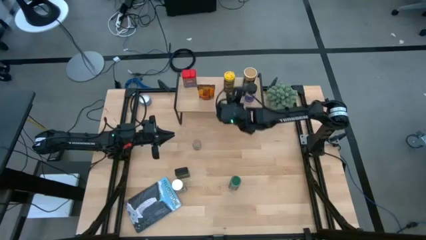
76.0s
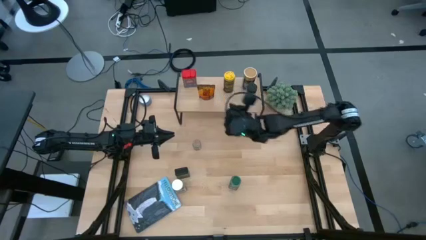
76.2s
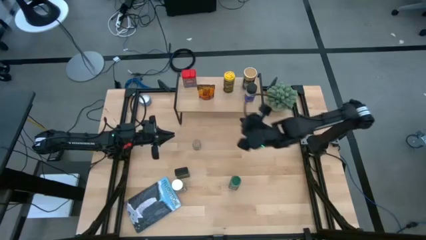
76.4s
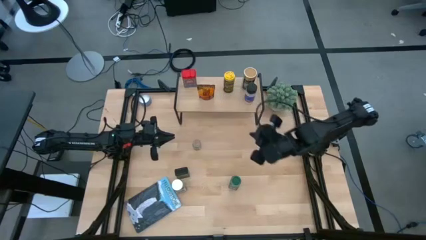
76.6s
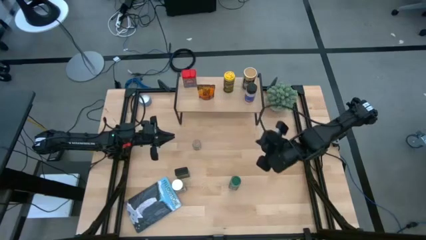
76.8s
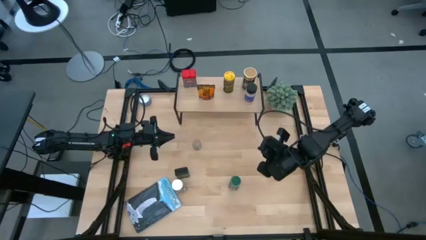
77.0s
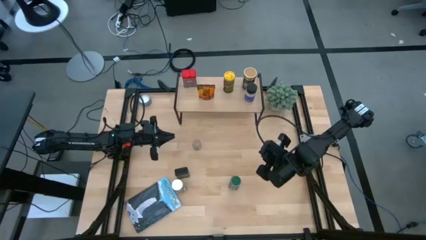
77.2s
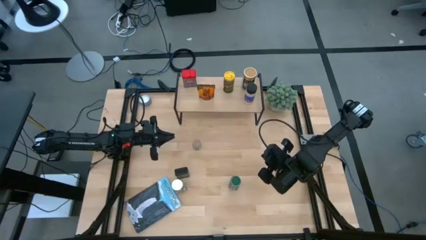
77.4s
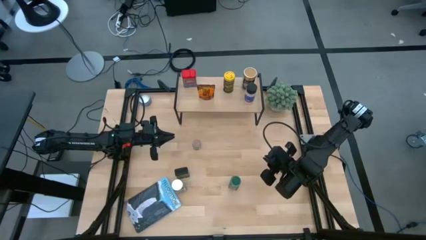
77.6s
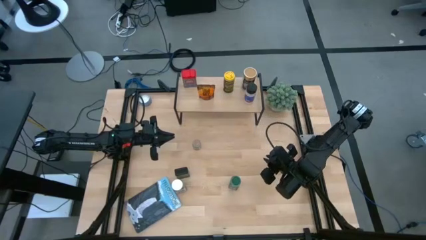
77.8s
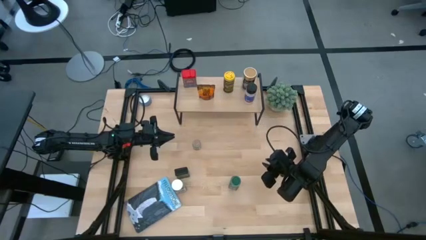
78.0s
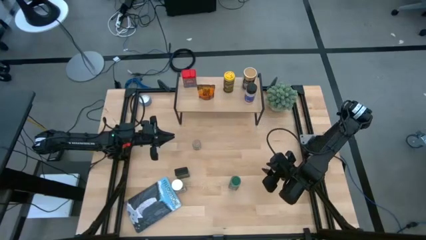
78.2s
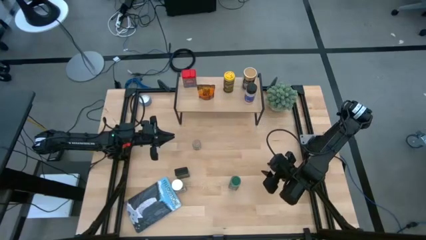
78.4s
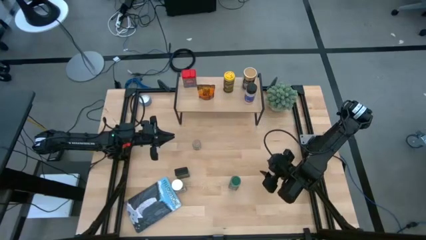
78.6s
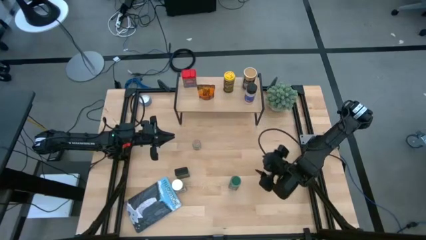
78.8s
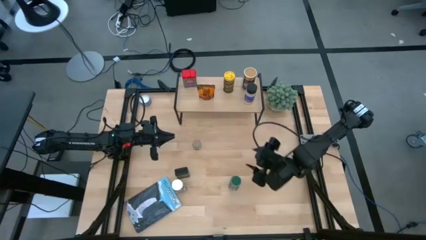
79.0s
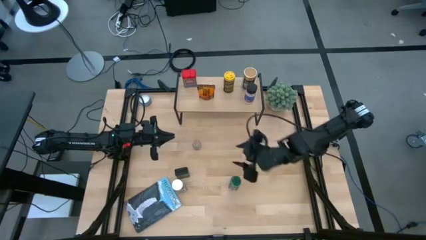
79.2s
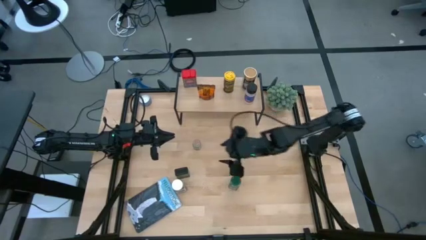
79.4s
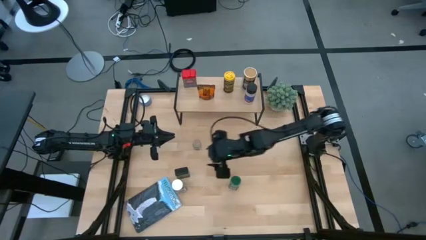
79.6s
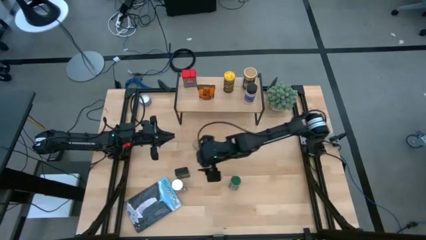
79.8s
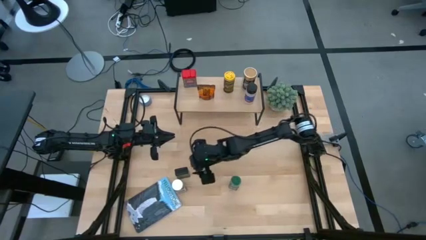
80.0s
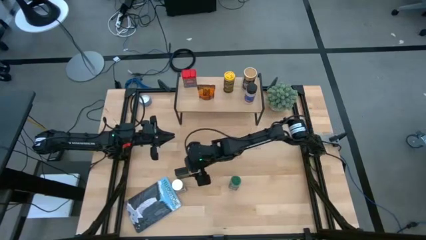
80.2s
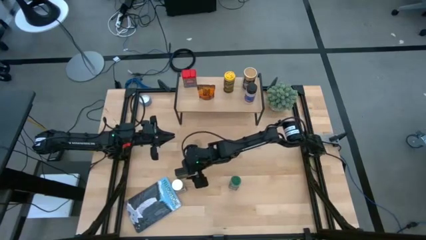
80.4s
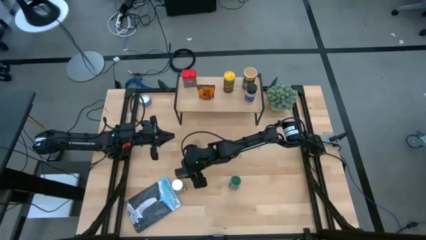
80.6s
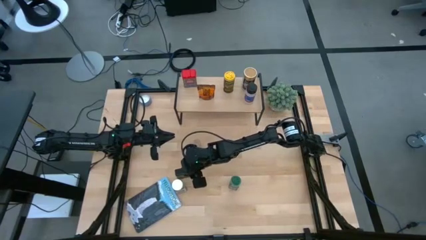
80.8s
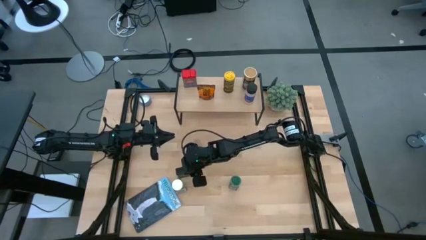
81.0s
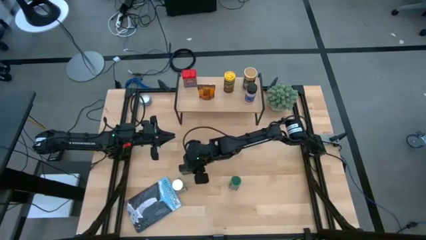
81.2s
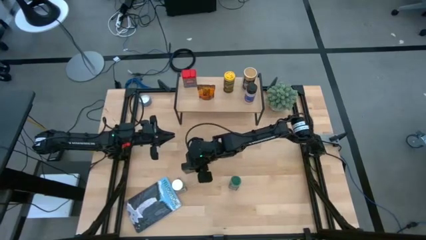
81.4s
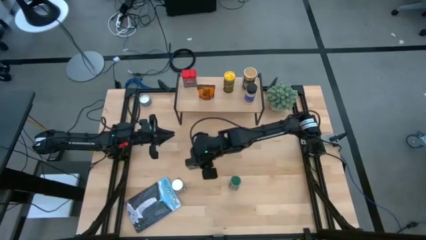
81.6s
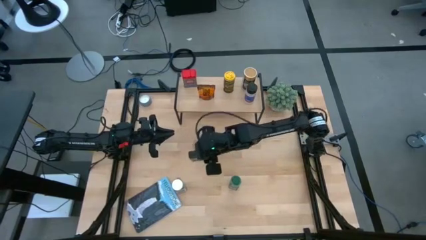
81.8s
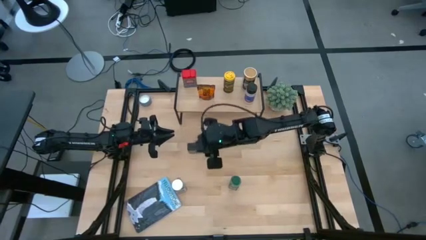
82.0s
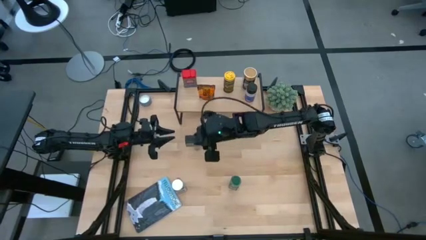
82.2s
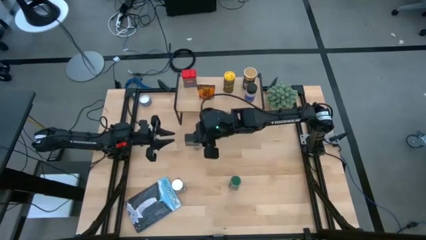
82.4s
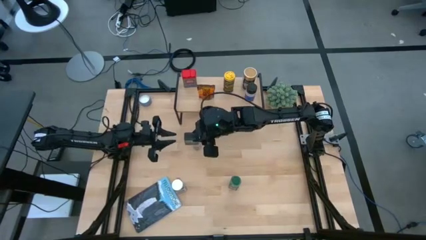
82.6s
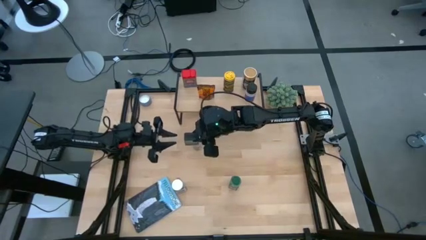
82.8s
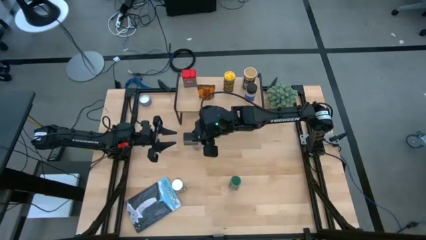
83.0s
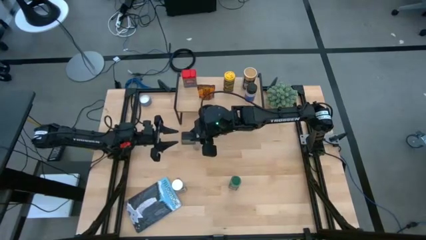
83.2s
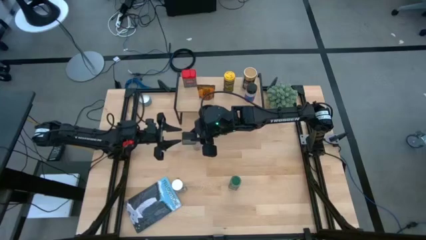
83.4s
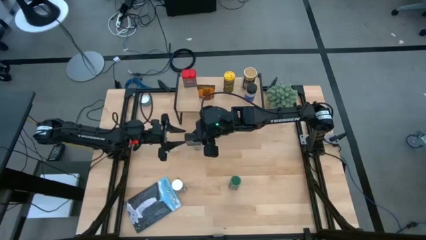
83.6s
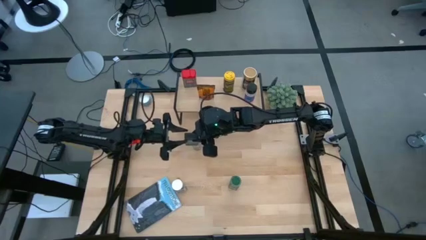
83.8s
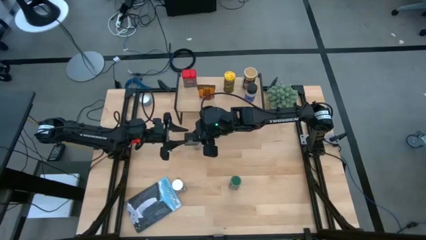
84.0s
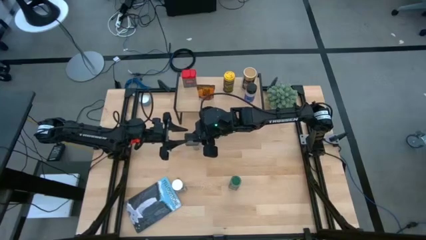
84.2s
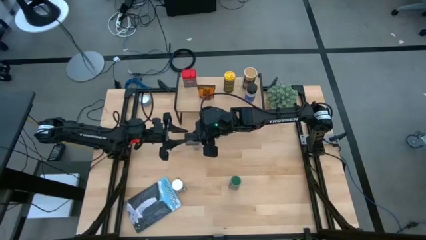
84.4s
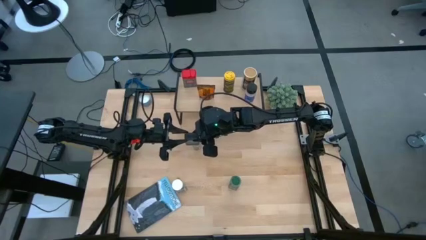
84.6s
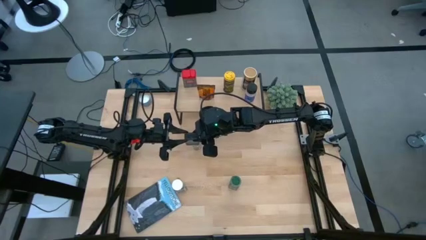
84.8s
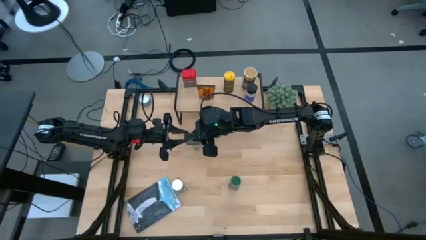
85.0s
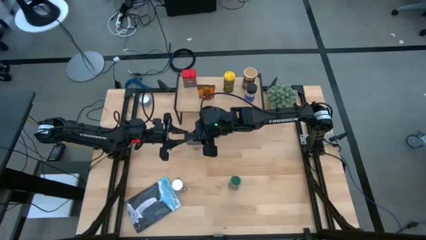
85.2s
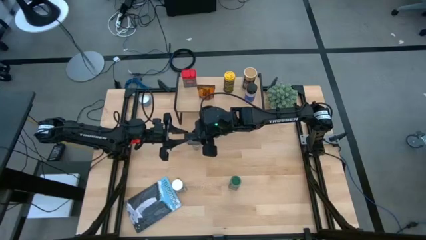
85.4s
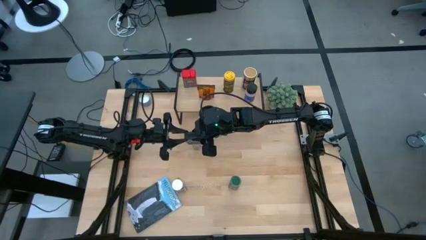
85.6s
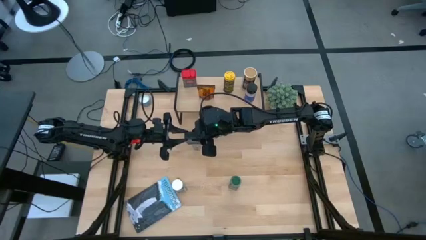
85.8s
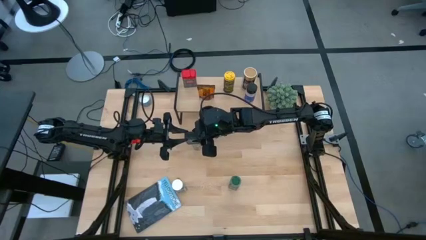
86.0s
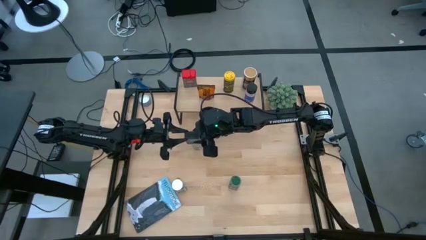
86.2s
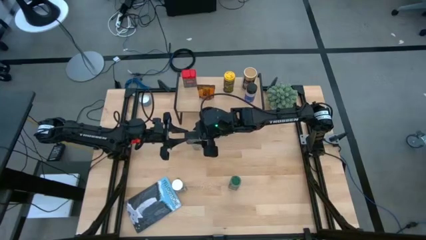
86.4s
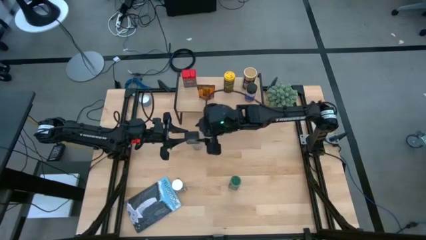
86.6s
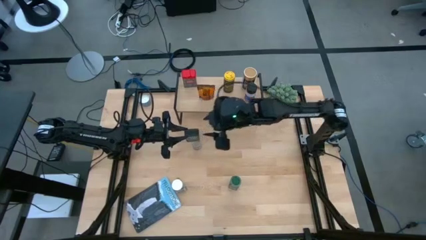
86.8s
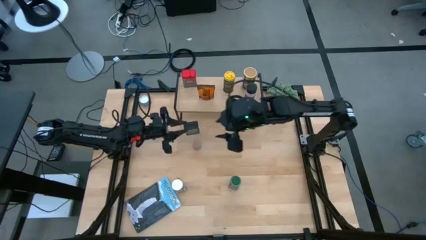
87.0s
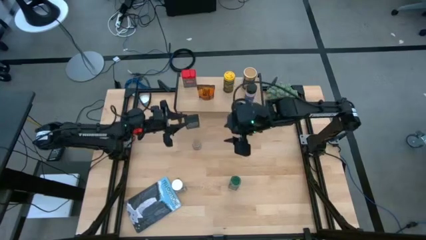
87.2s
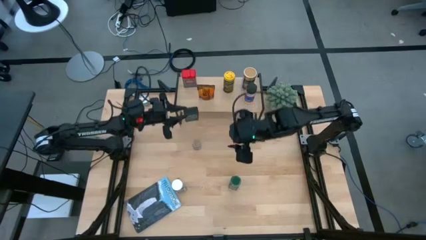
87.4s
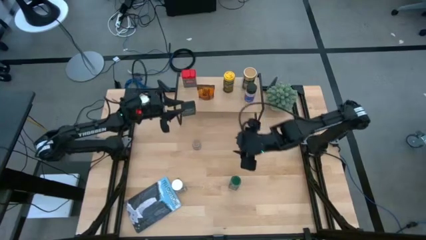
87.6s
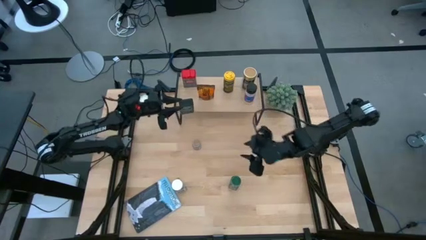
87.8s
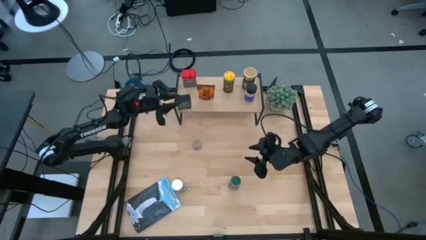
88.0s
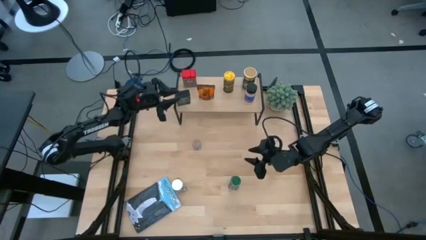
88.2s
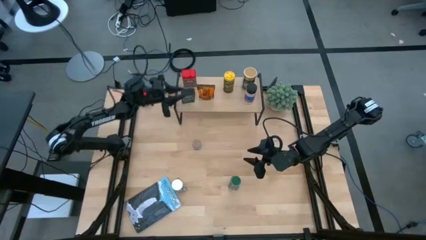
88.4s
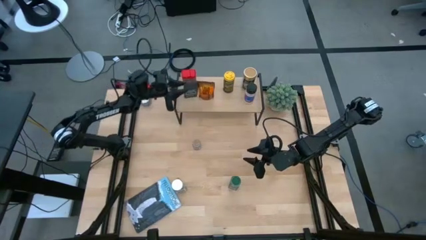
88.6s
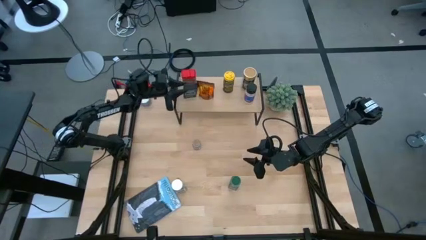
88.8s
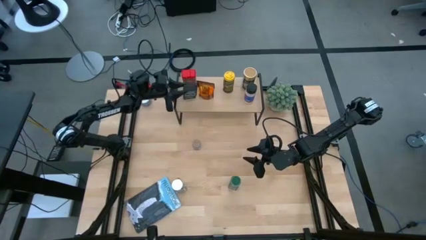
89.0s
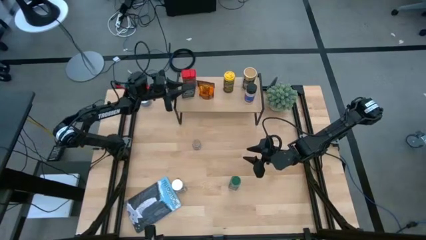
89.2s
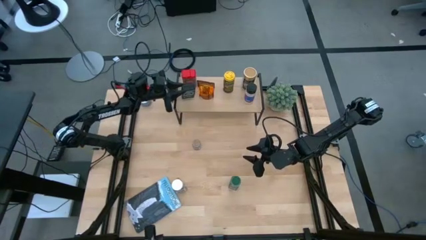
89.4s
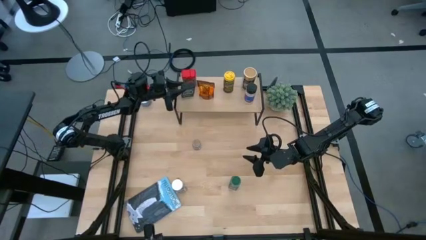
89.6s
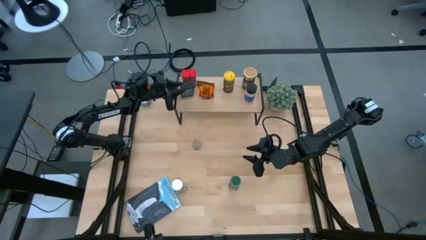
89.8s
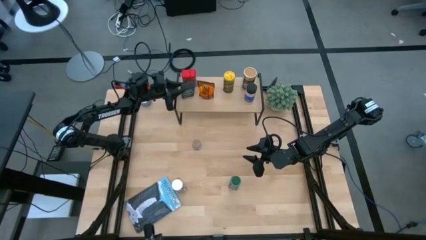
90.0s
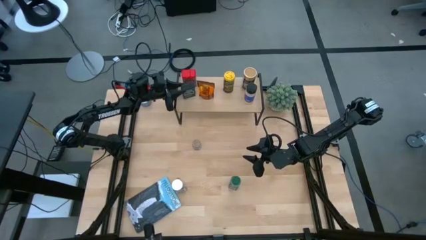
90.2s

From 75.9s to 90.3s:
Task: Shelf spices
Put the black seasoning on the shelf
